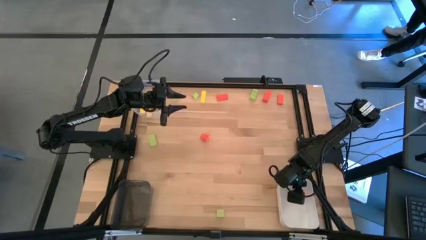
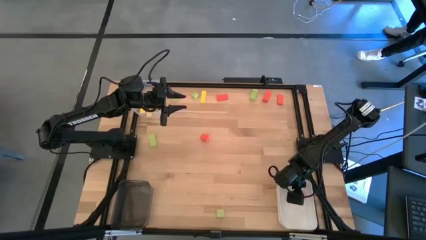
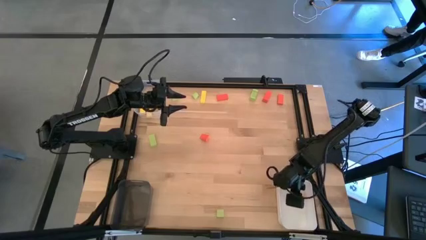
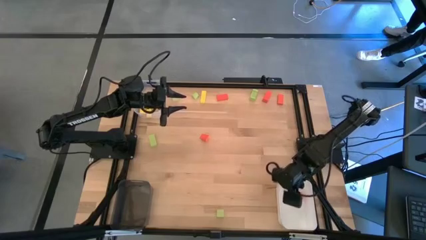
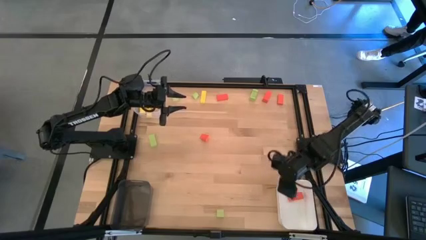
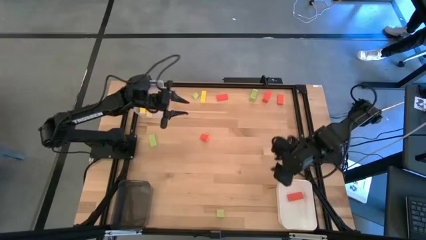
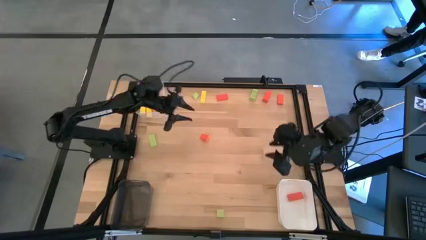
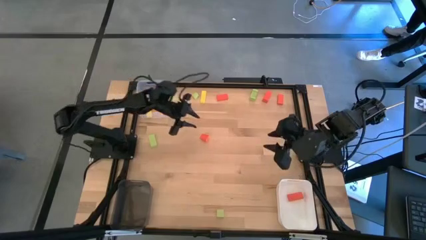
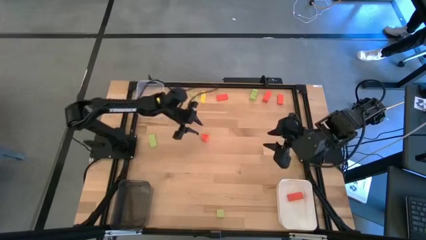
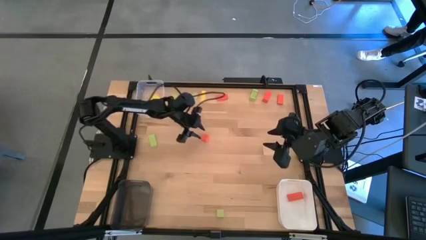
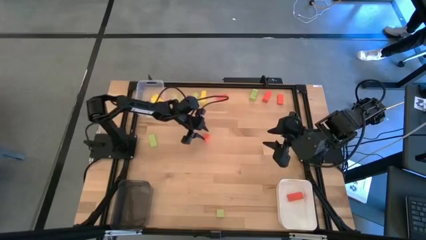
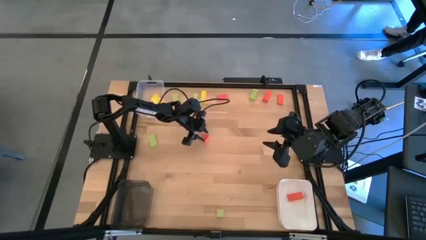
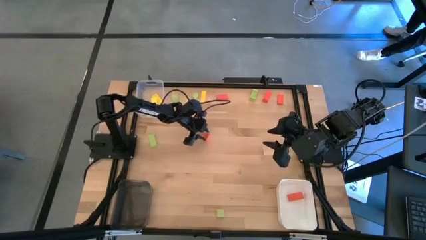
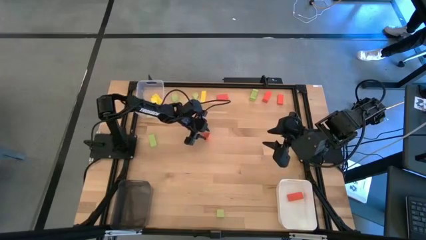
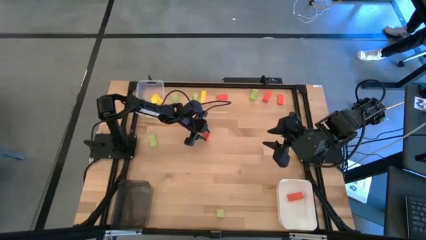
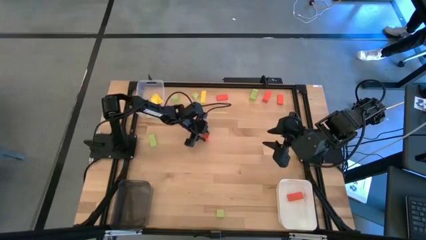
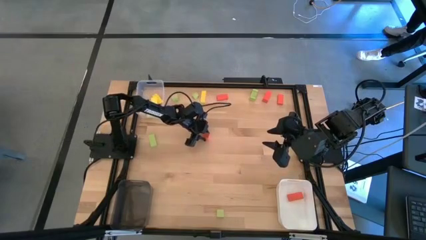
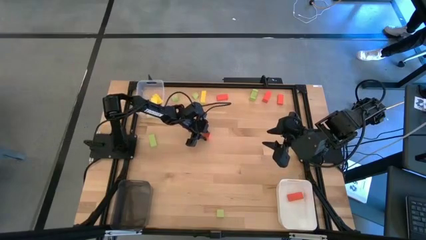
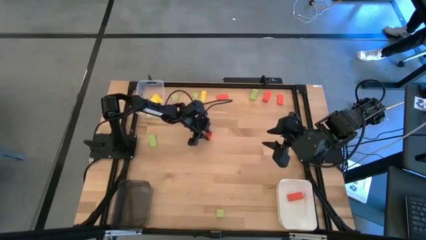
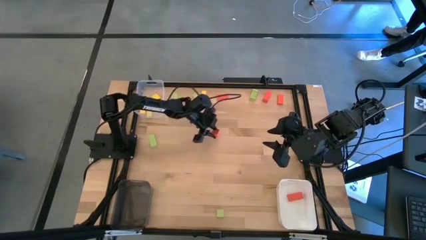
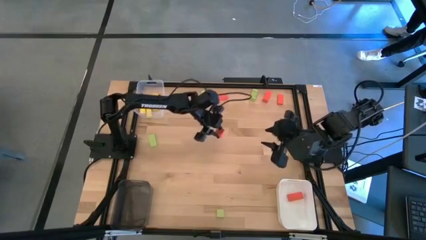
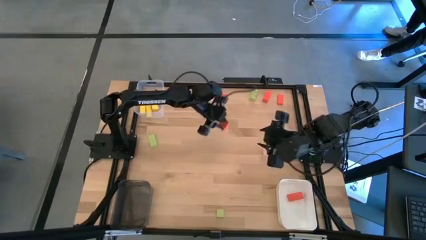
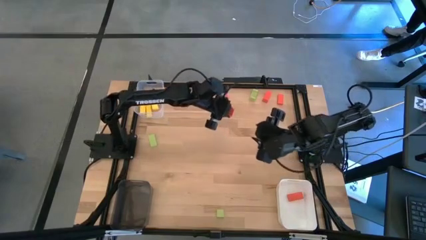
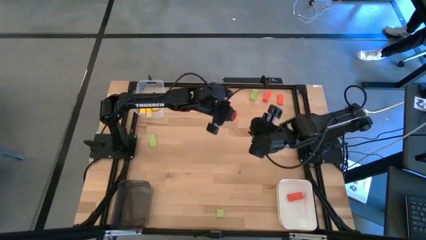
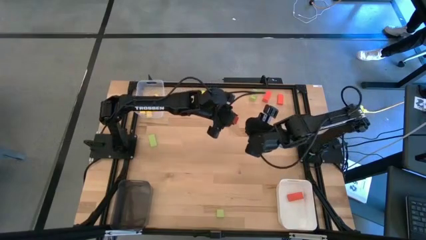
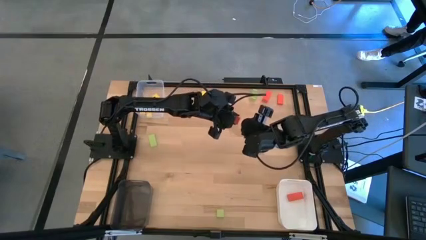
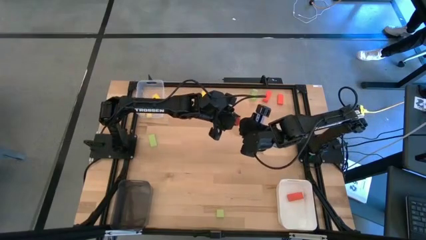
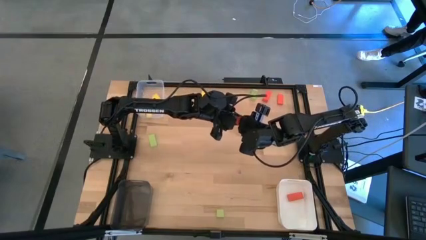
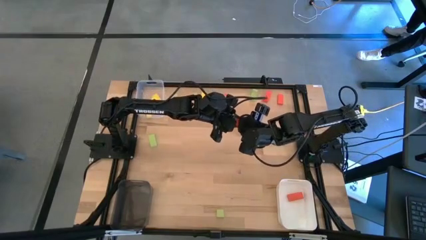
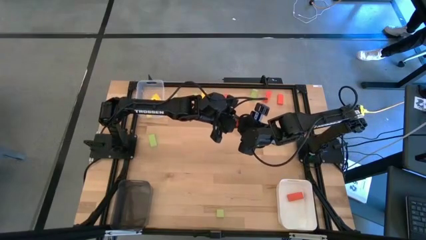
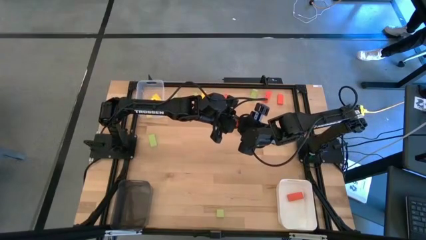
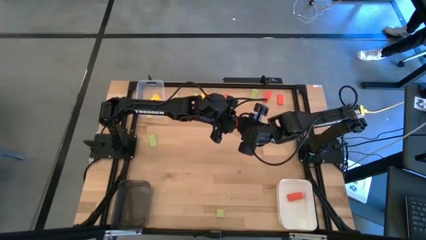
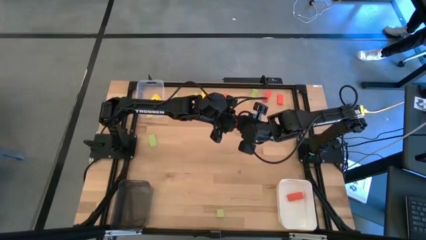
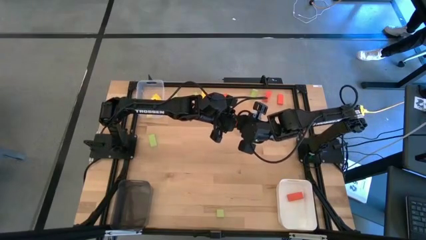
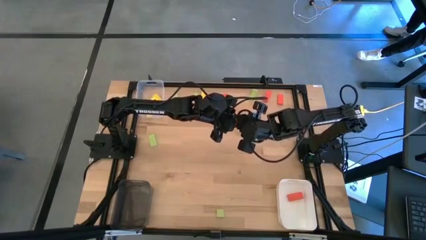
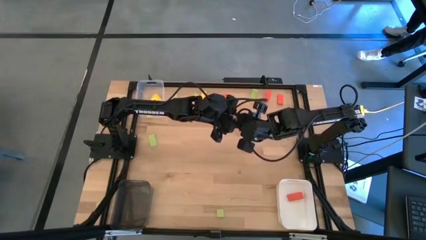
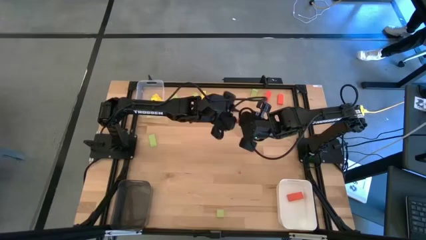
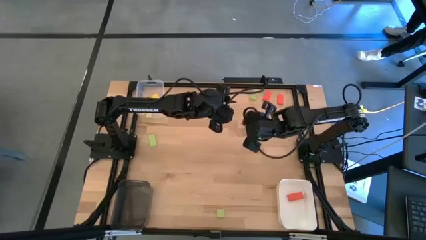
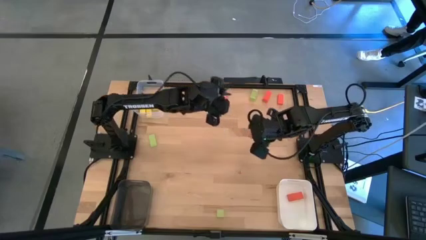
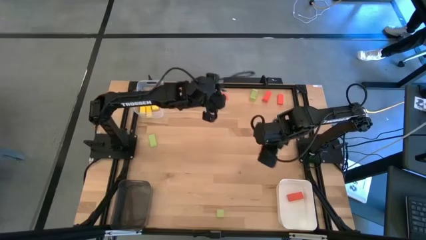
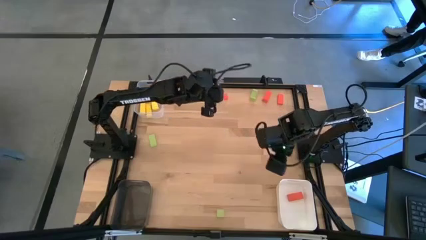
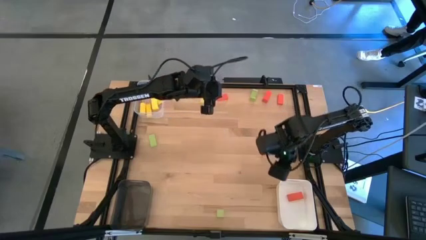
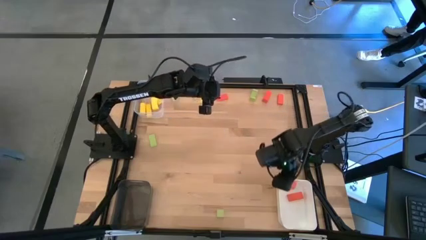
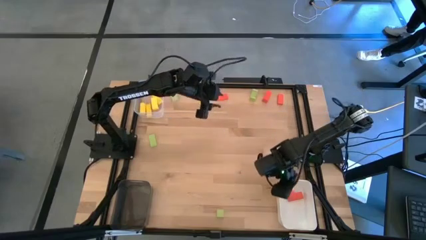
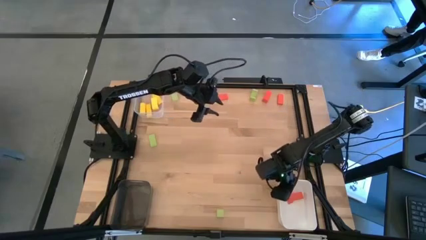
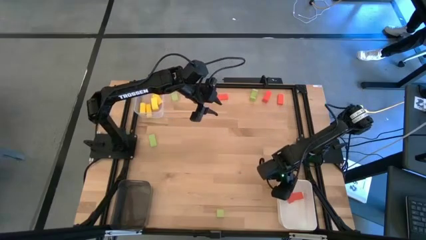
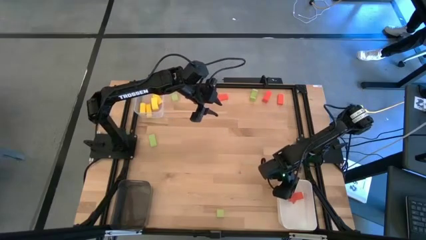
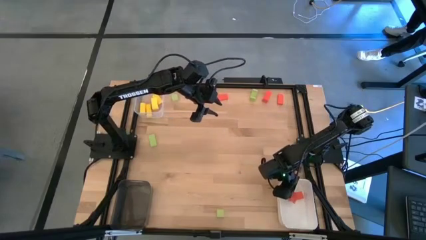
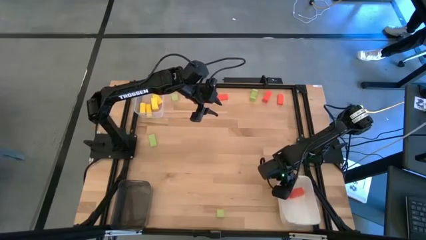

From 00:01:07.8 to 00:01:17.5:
Task: Sort & place blocks by color
Put the orange block into the white bin
